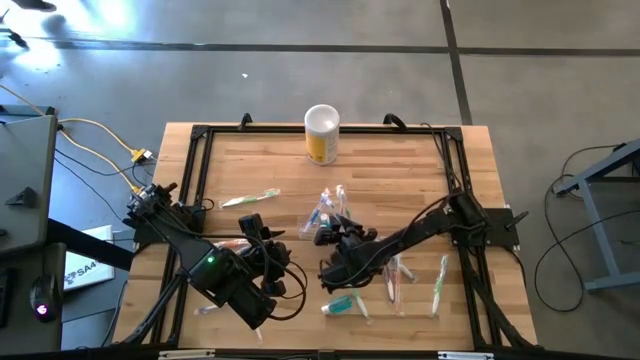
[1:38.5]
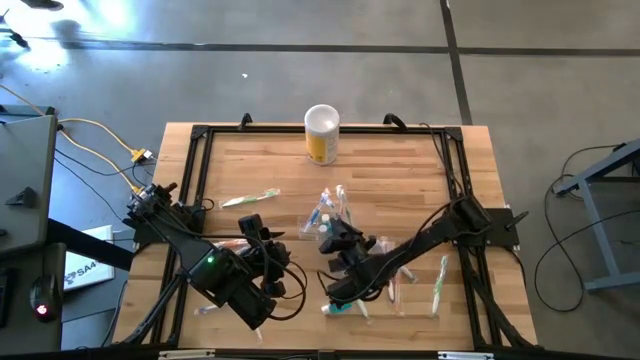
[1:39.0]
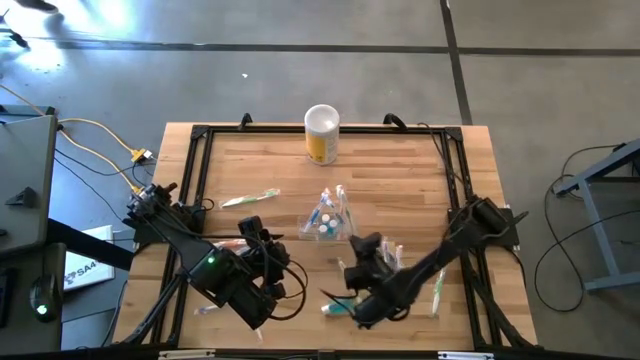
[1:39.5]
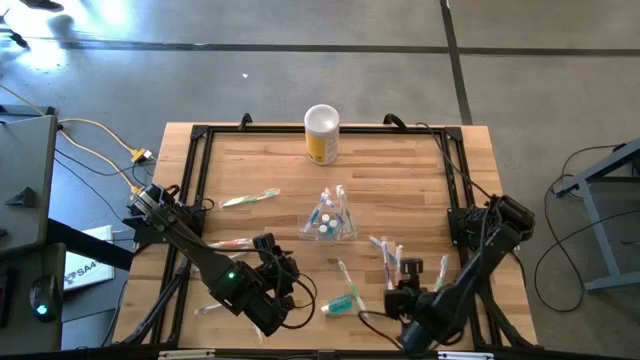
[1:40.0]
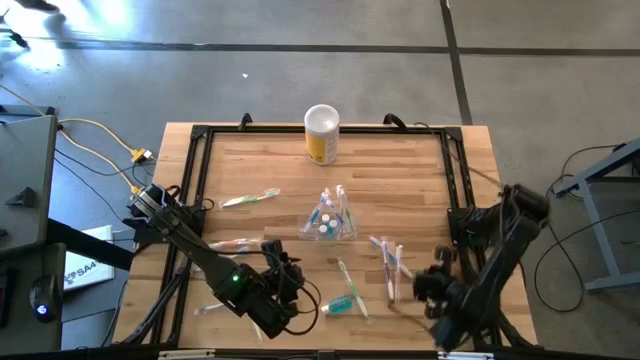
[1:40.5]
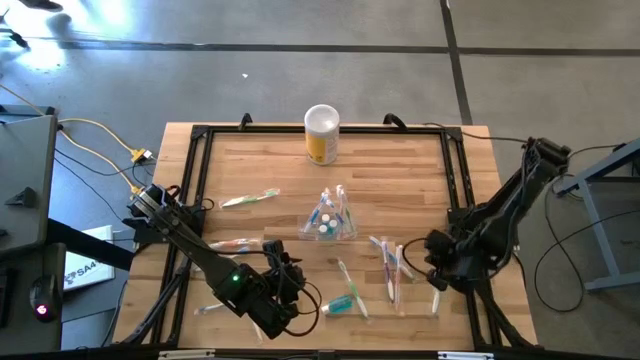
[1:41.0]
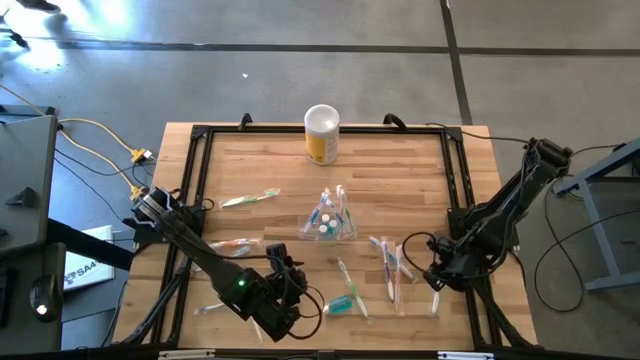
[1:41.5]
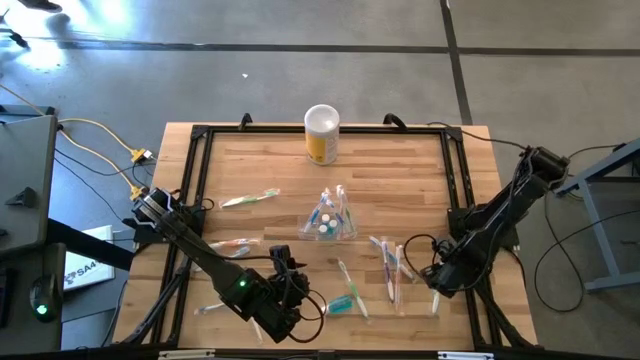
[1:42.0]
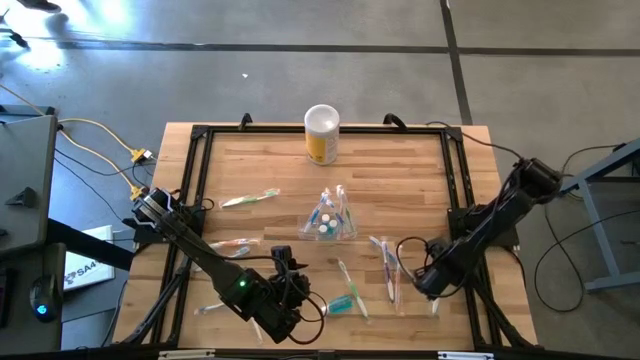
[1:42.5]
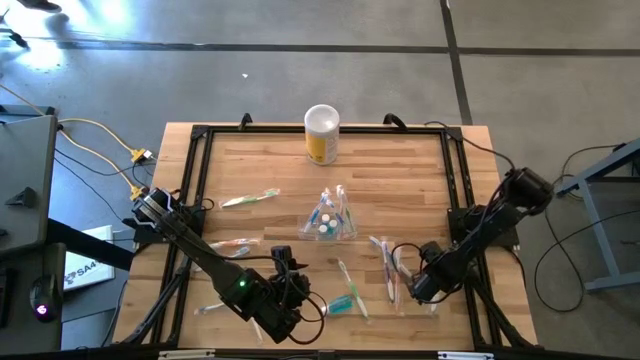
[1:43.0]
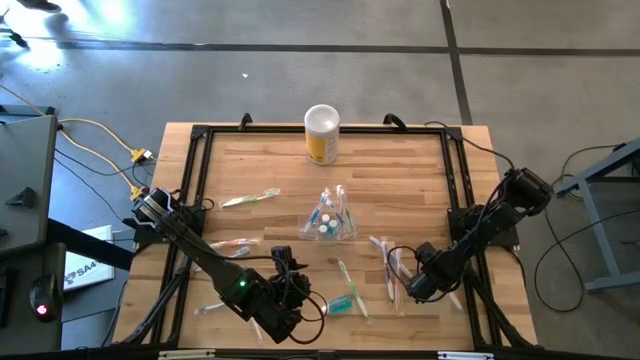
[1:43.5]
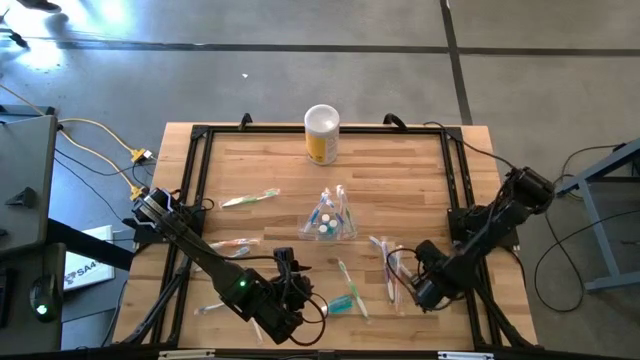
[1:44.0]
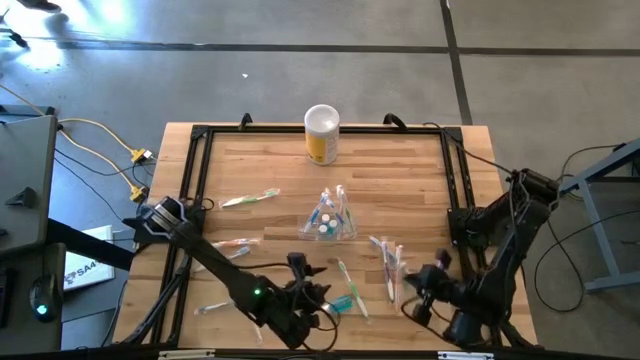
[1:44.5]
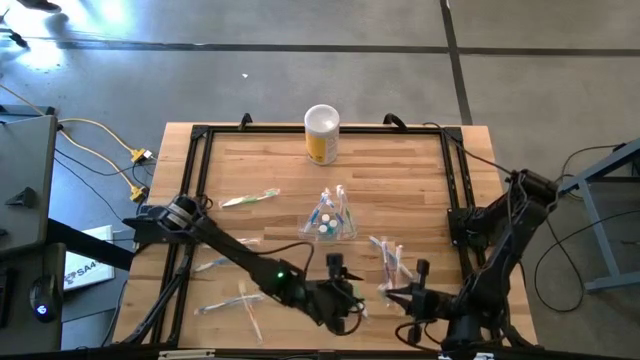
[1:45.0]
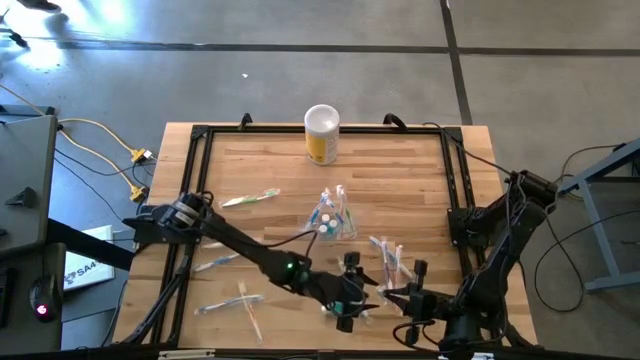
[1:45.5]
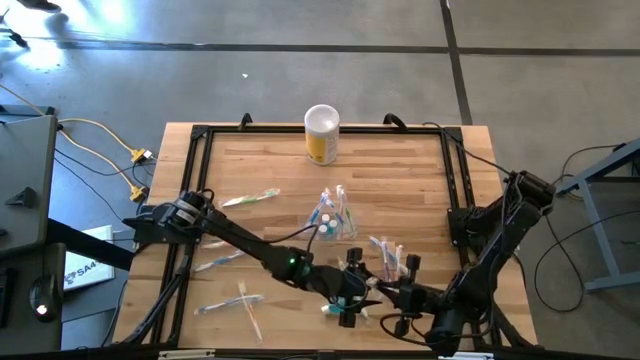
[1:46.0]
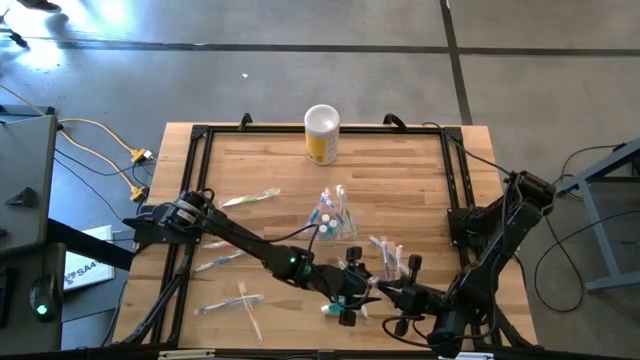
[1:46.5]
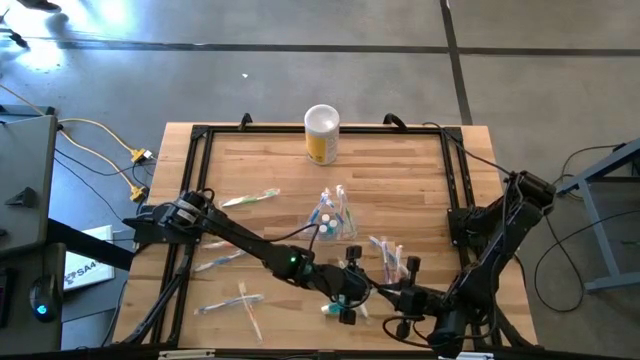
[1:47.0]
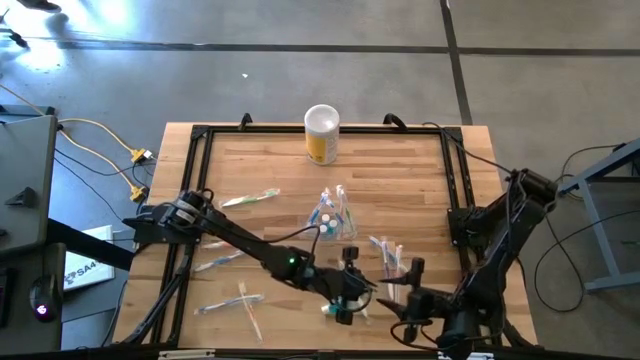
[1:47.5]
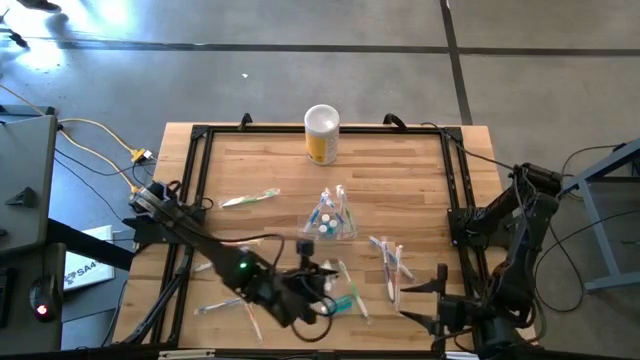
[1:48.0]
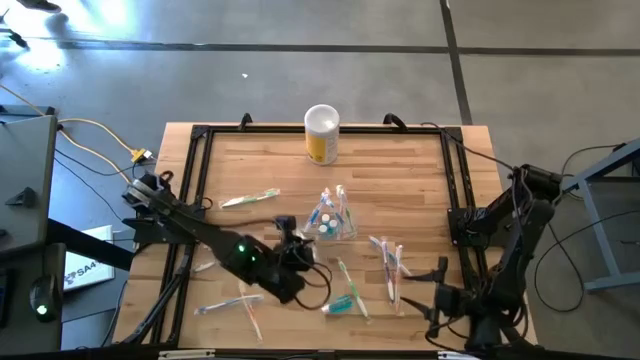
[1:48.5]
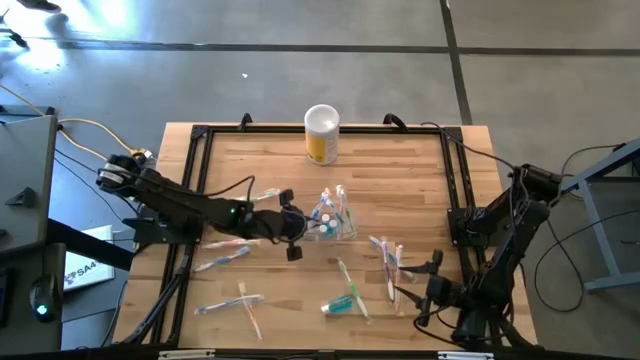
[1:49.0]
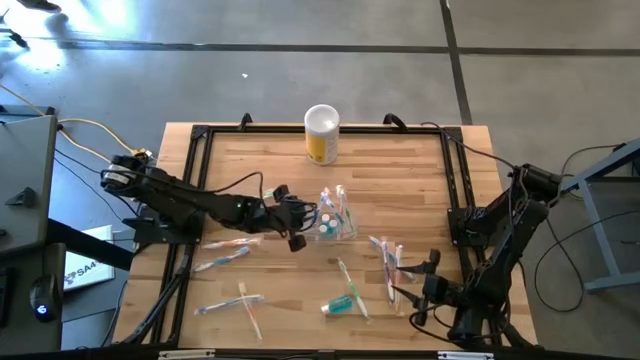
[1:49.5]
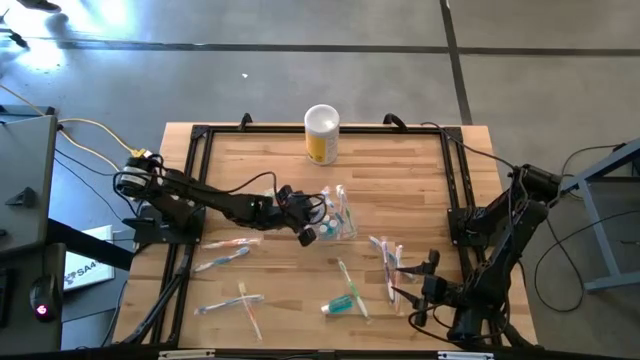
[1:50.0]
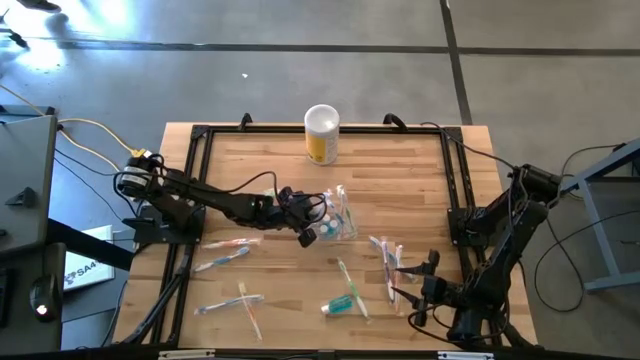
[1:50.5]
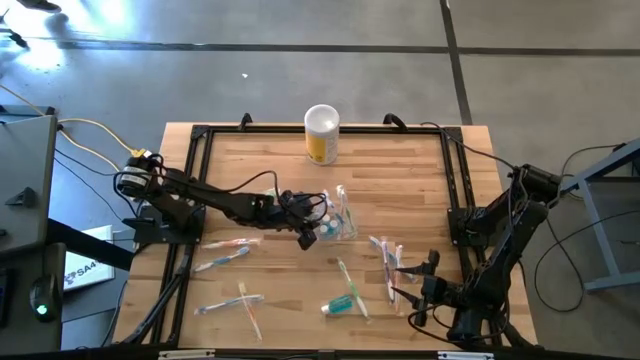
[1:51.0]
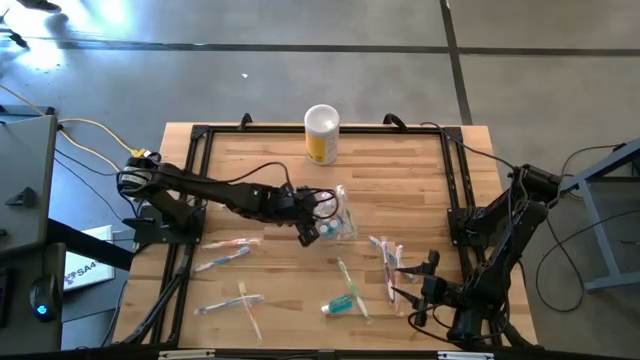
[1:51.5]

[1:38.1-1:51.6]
Task: Pick & Place toothbrushing station
Put the green toothbrush into the left part of the transparent organizer

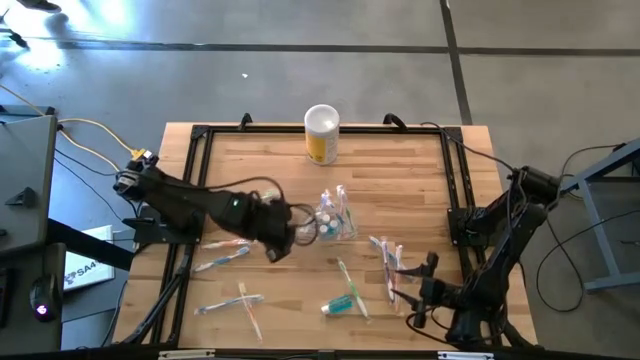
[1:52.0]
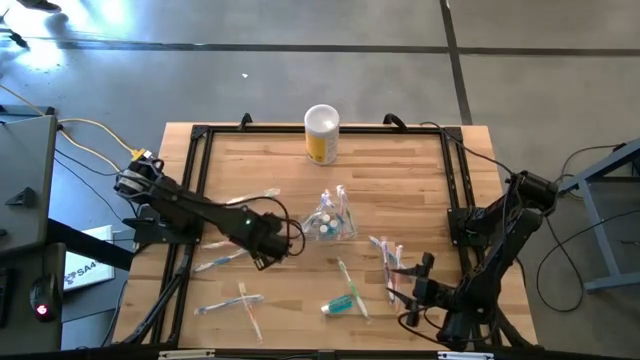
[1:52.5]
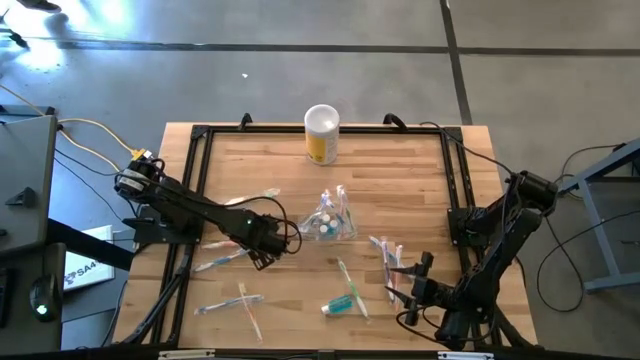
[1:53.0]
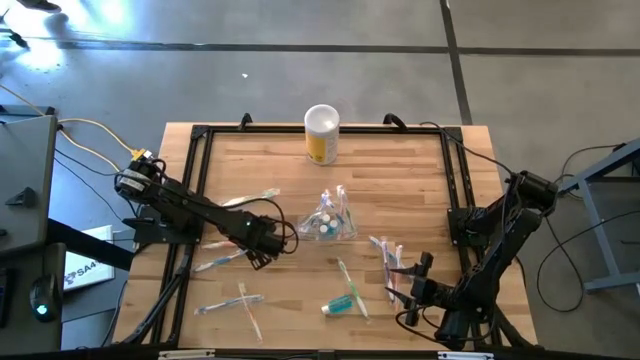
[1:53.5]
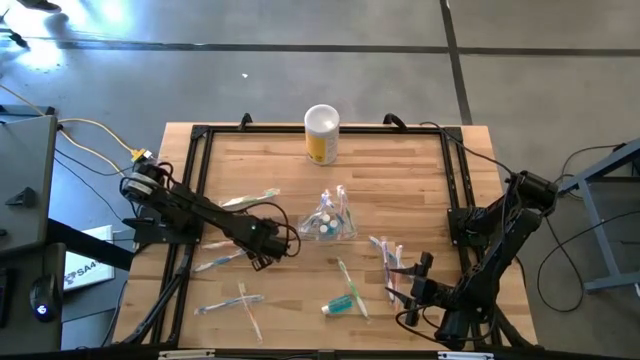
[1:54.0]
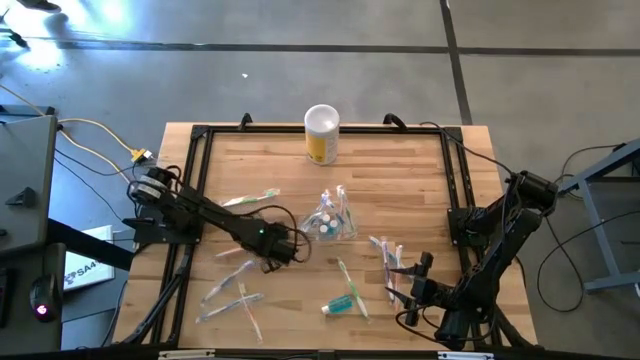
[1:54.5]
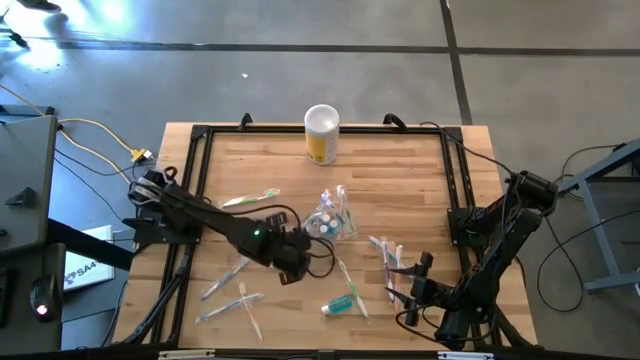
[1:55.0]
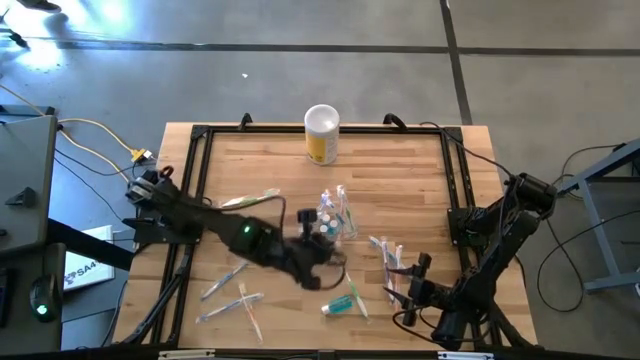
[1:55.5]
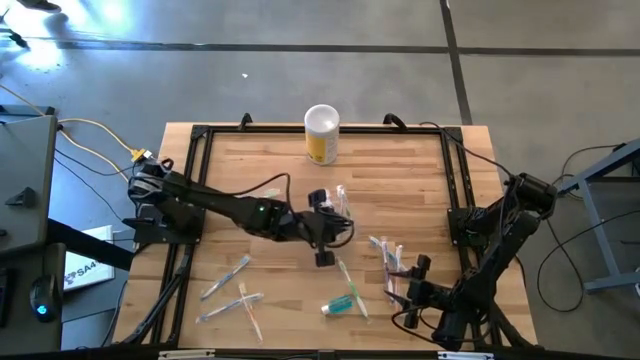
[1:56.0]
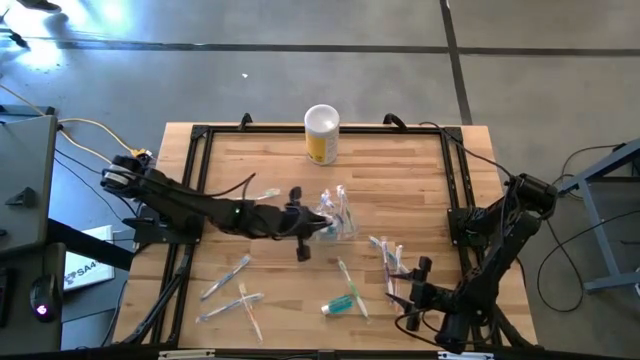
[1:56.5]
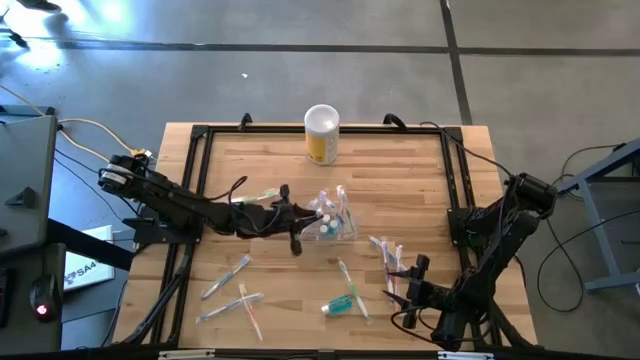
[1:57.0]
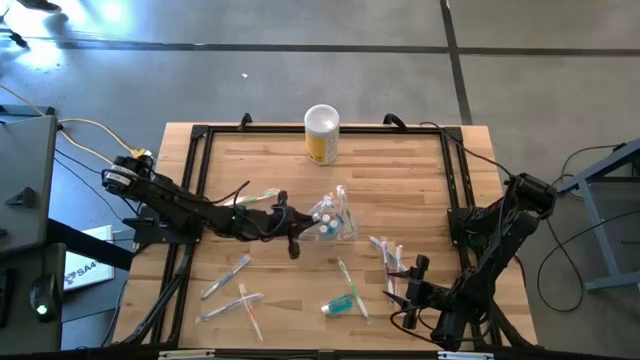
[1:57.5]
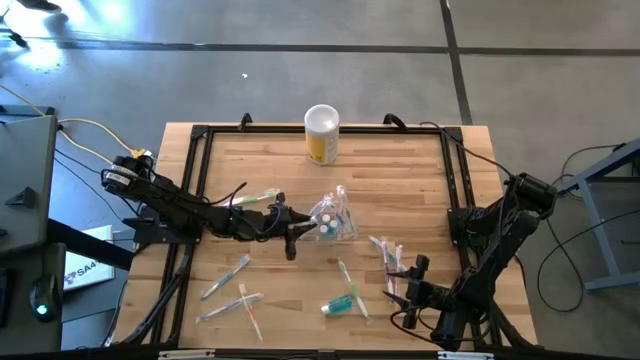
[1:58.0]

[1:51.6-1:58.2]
Put the orange toothbrush into the left part of the transparent organizer

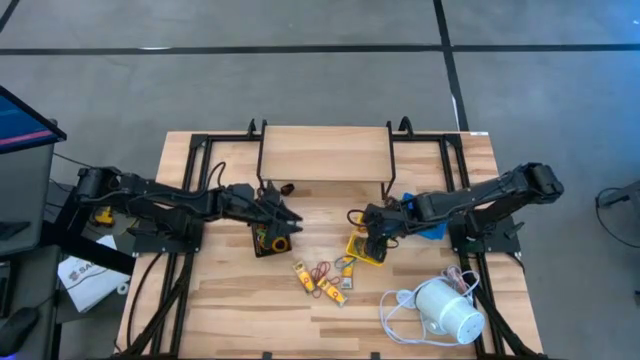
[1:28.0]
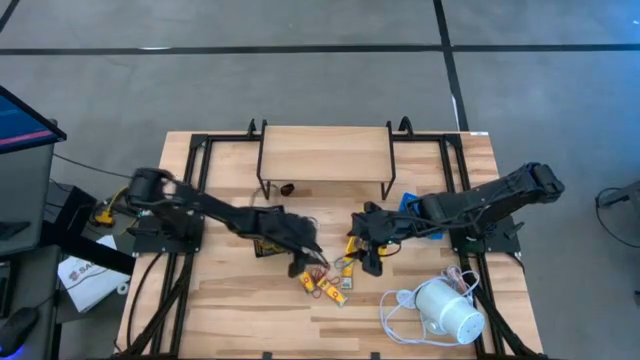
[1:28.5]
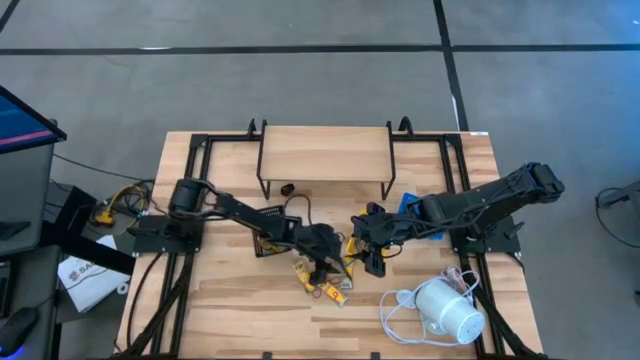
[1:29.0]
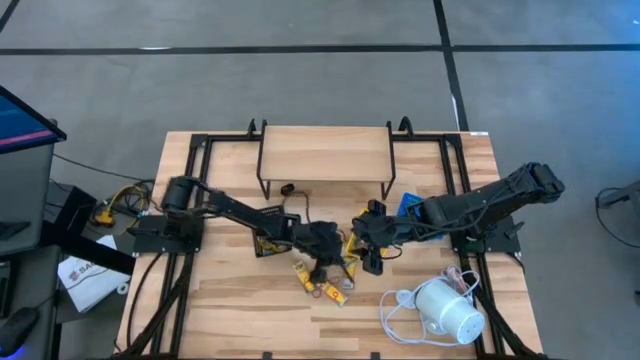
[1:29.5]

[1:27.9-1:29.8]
Task: Pick & Place Office Desk Supplies
Put the blue rubber band into the yellow bin

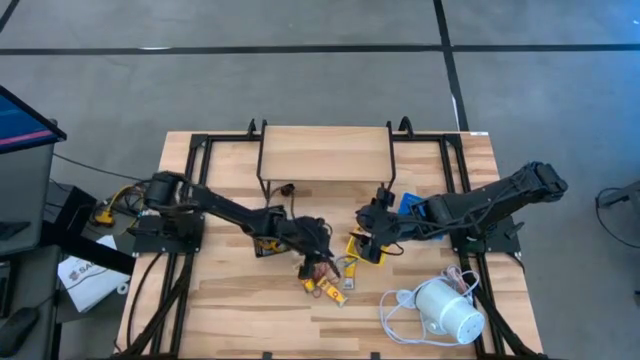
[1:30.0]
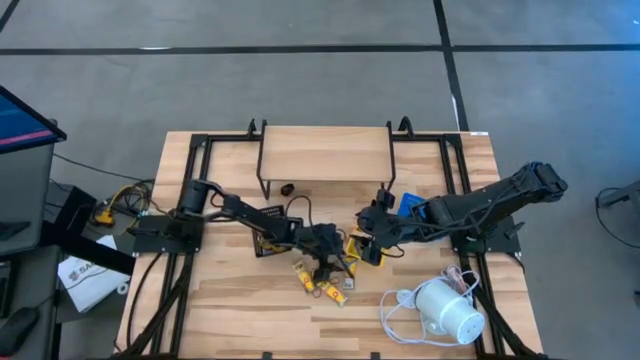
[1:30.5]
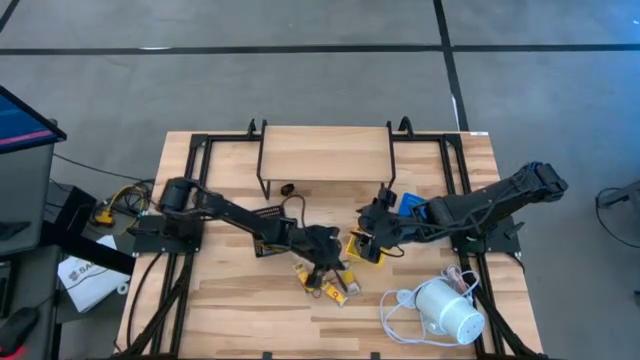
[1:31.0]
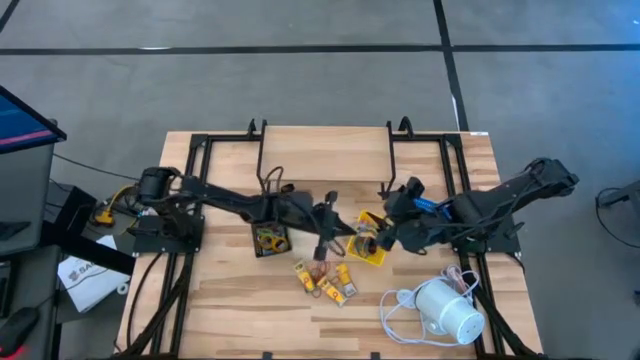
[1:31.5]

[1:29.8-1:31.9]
Put the blue rubber band into the yellow bin
